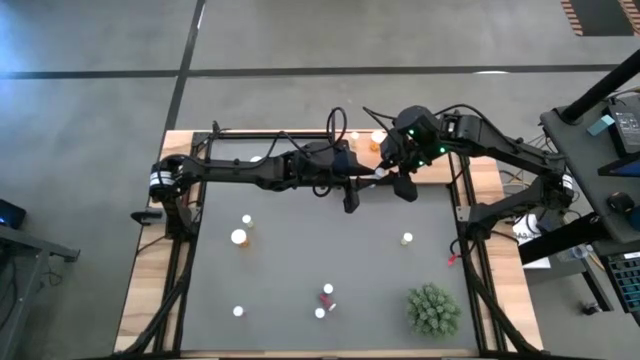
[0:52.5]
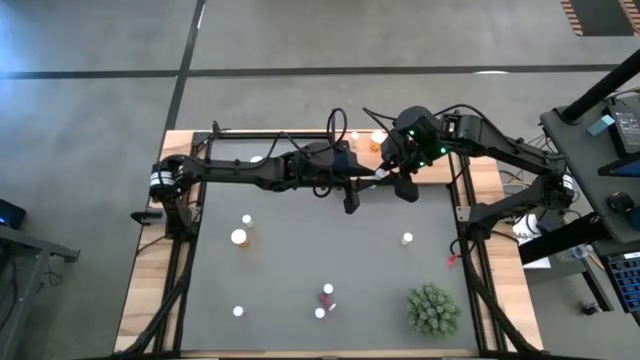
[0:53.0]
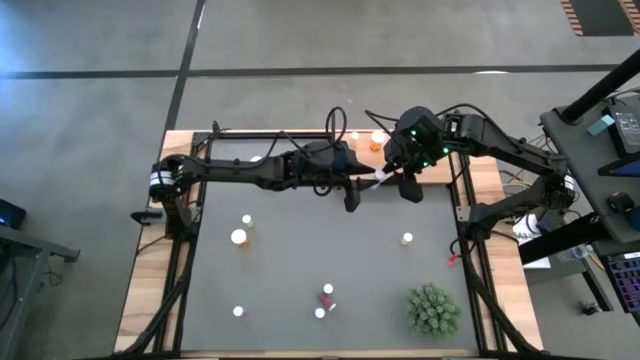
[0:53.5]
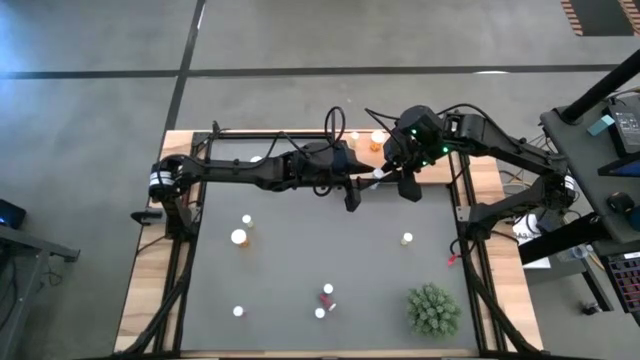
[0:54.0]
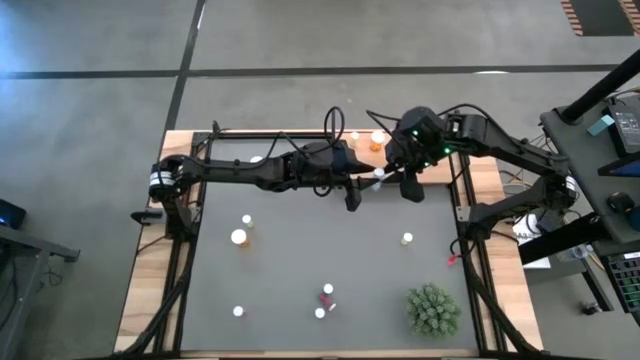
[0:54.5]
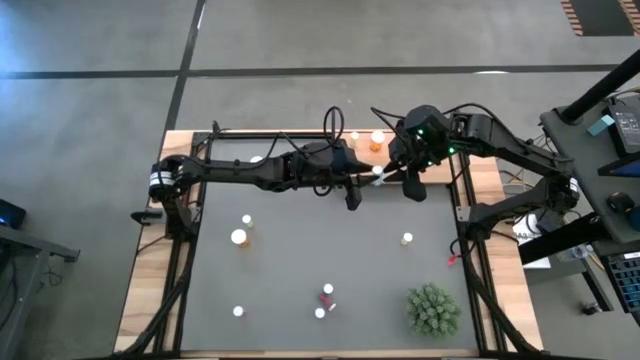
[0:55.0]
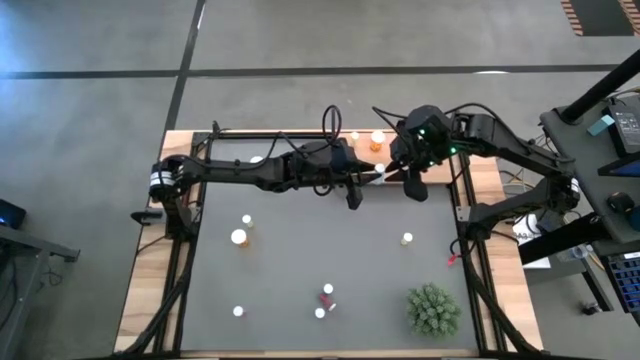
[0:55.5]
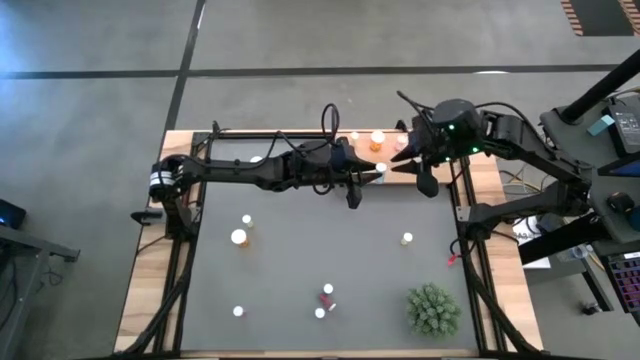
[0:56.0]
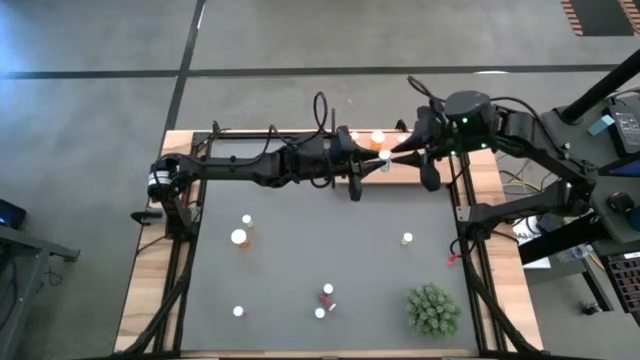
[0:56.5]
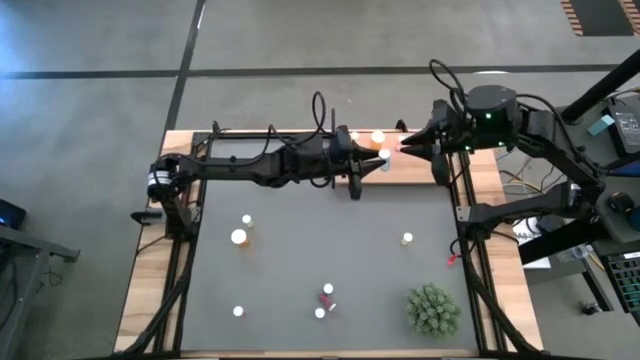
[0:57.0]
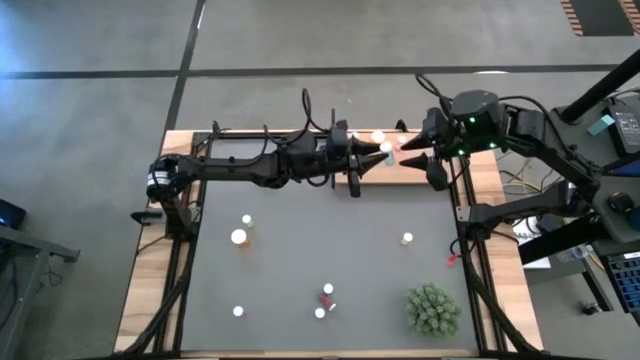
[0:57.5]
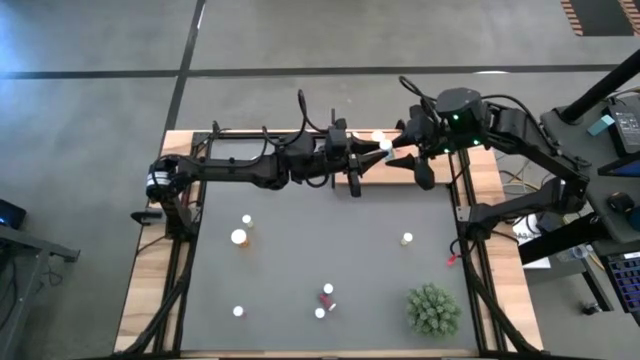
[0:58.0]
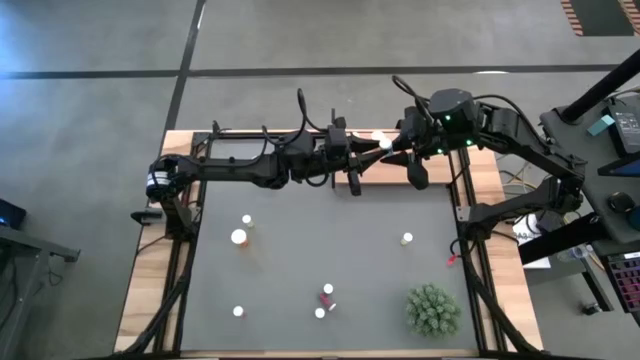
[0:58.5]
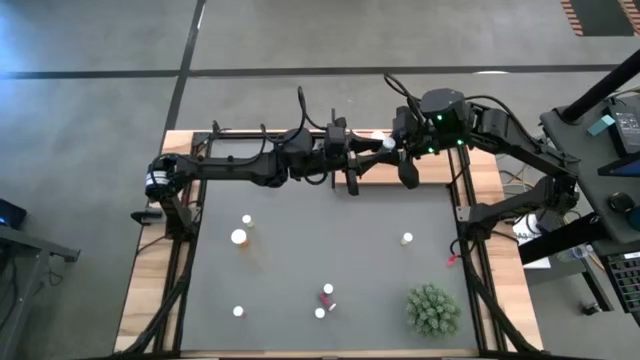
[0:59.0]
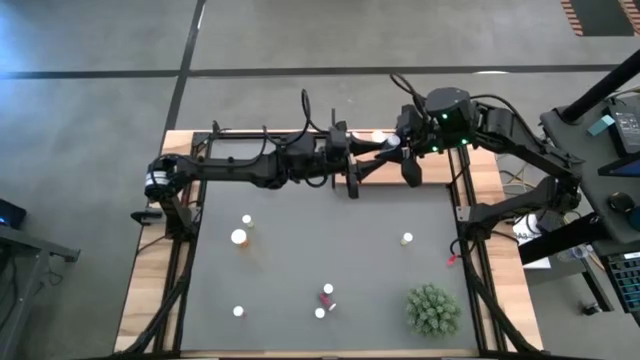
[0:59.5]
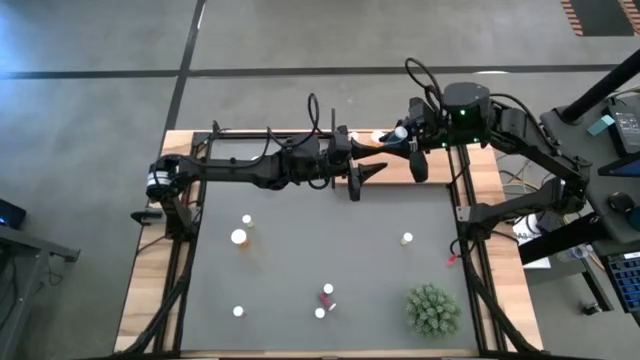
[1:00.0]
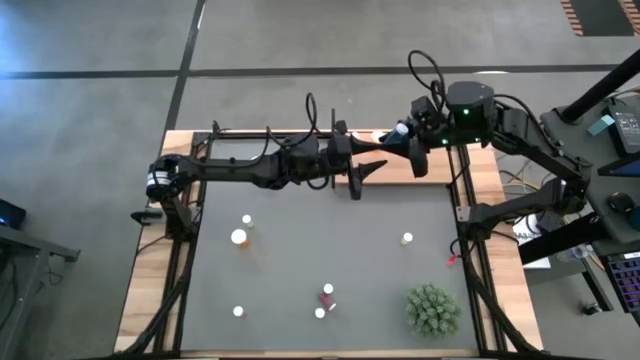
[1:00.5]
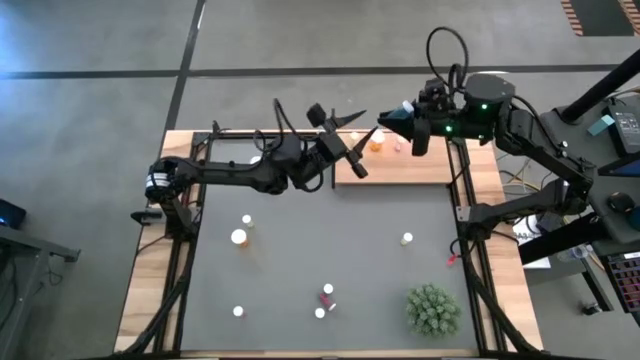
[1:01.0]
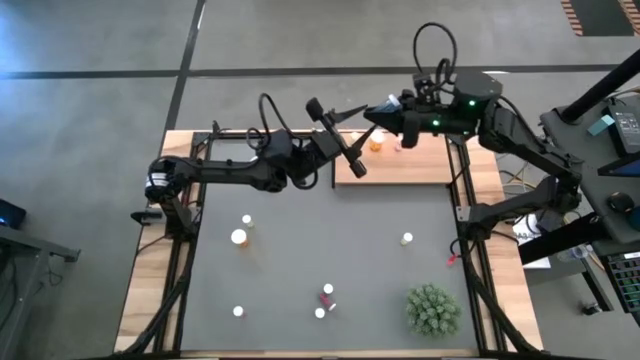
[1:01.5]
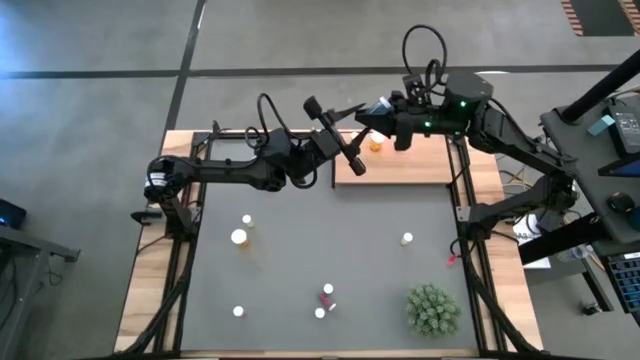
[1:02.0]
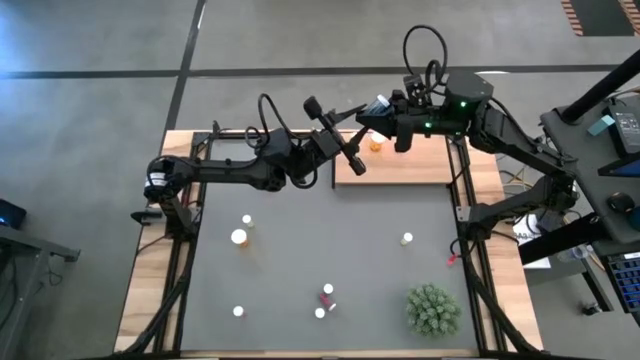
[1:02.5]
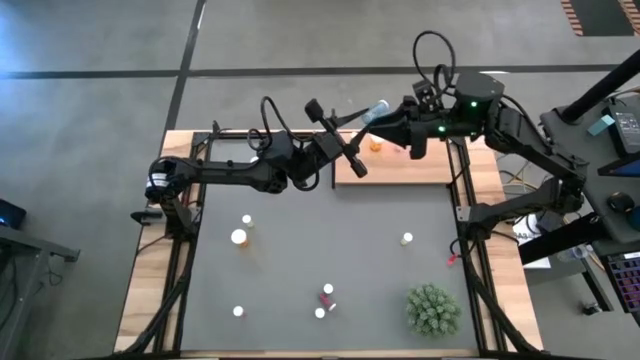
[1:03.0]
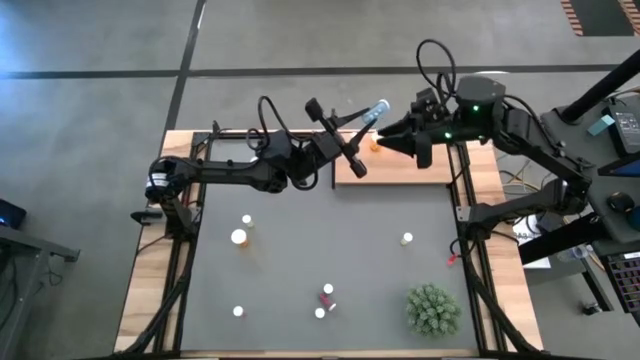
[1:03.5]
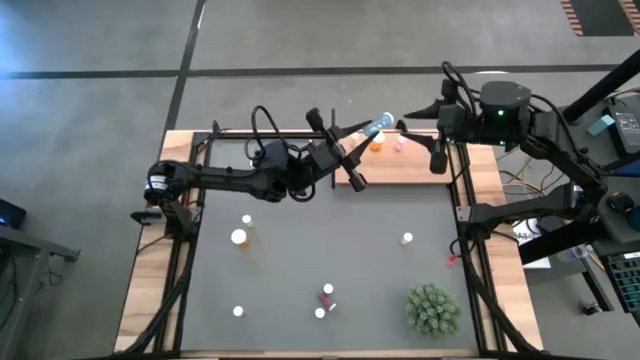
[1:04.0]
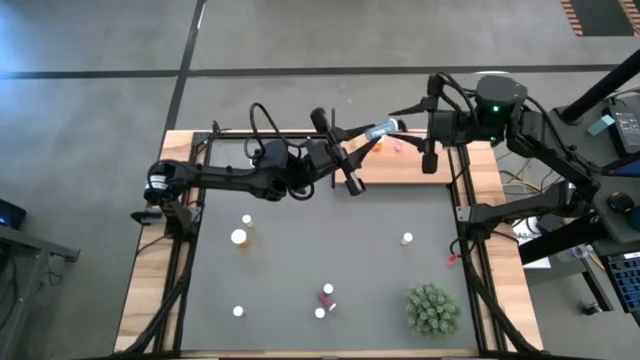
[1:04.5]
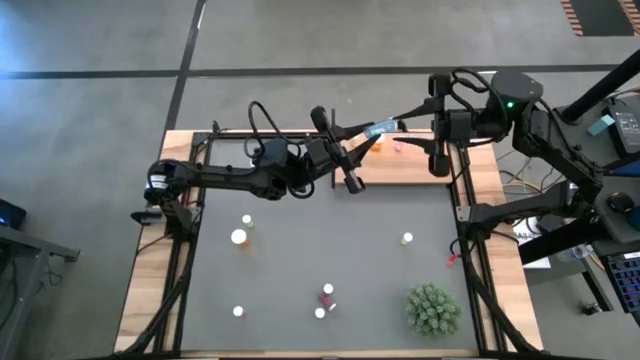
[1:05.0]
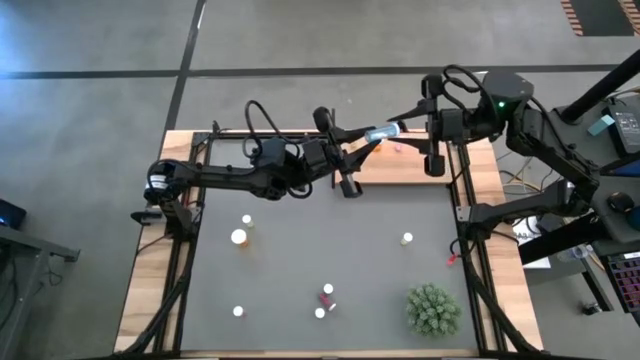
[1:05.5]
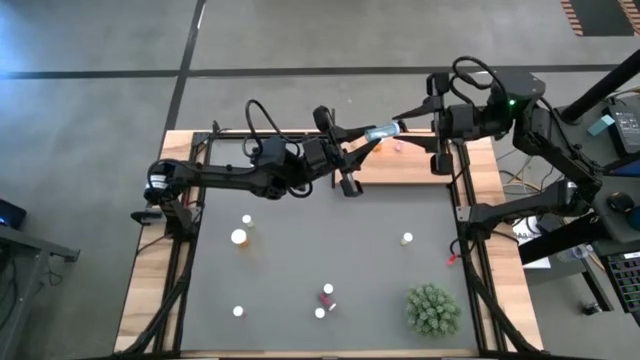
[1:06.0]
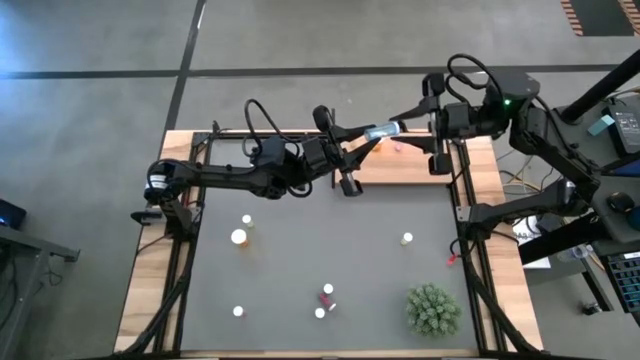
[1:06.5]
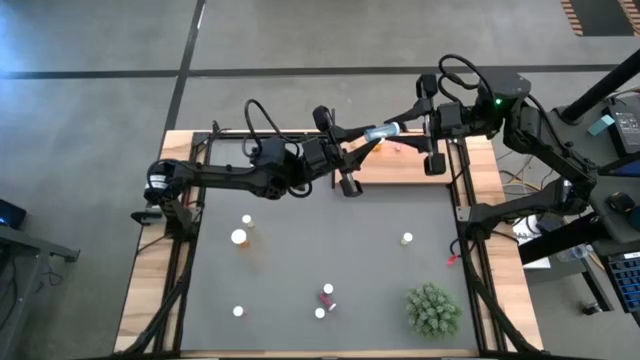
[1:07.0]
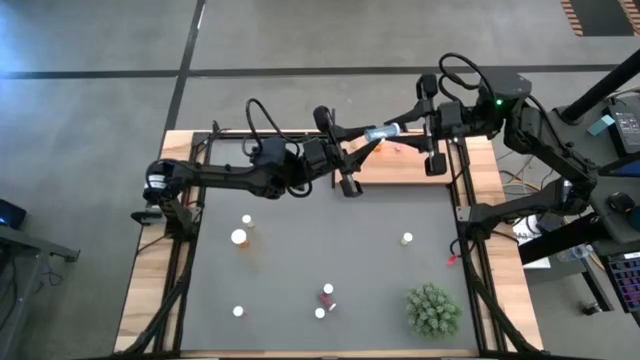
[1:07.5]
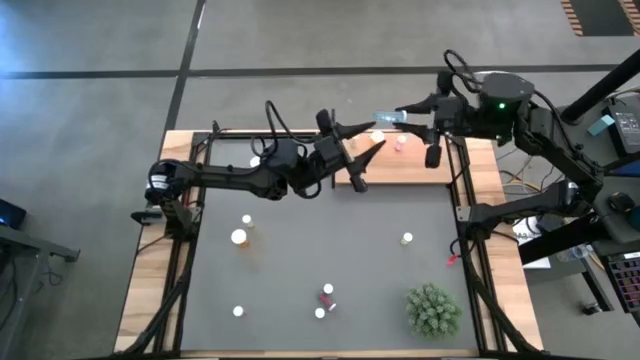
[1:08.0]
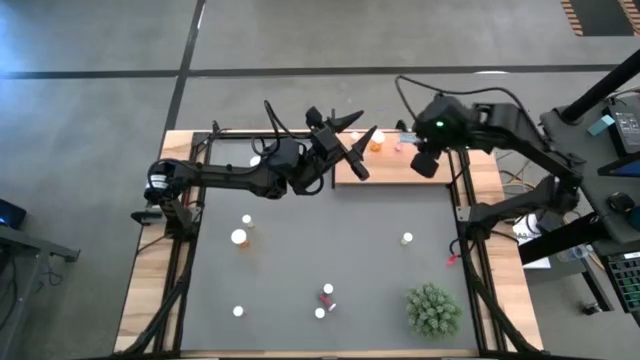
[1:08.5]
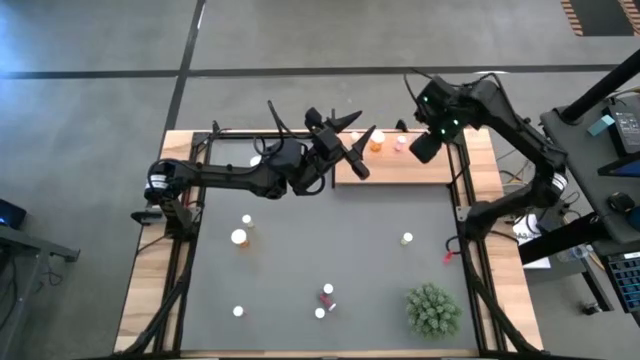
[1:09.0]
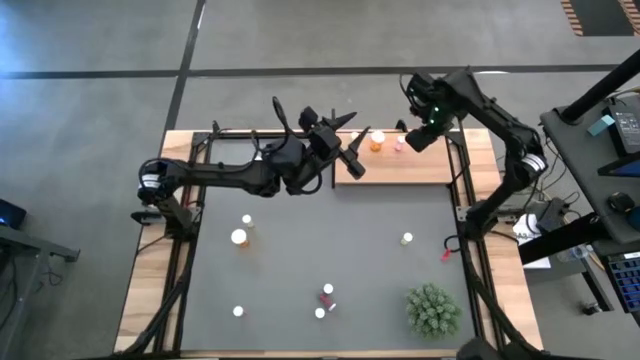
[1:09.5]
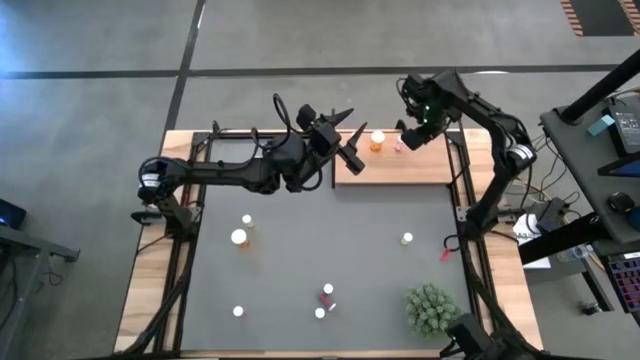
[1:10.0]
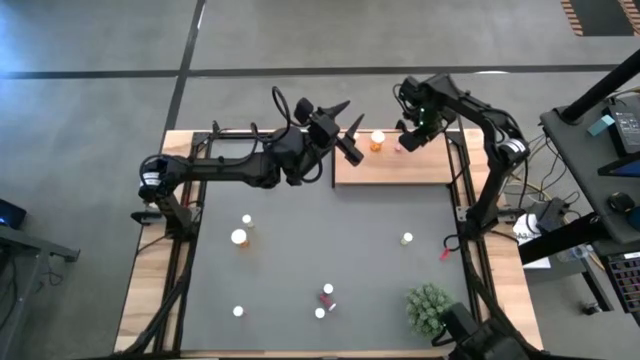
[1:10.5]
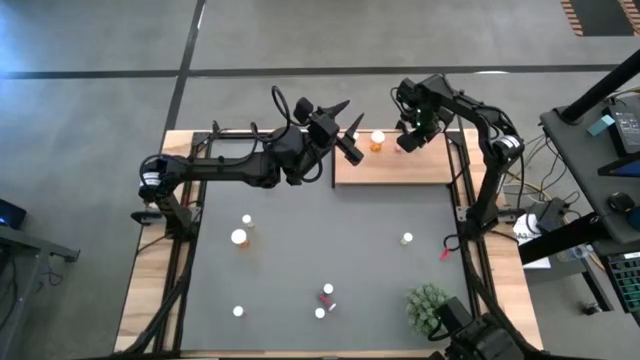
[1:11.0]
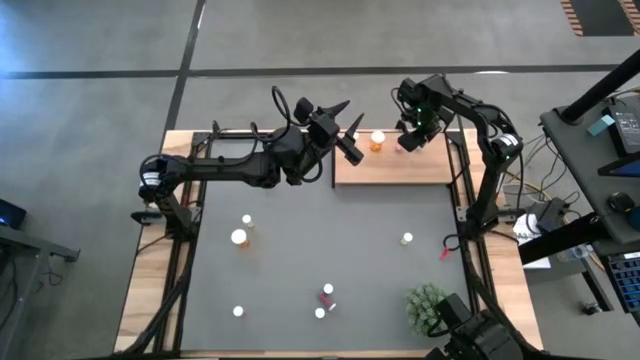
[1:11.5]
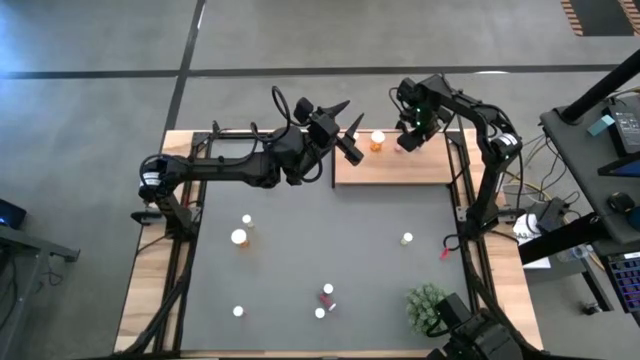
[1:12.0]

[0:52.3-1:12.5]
Task: Pick and place medicine bottles onto shelf by color
Put the bottom left blue medicine bottle on the shelf

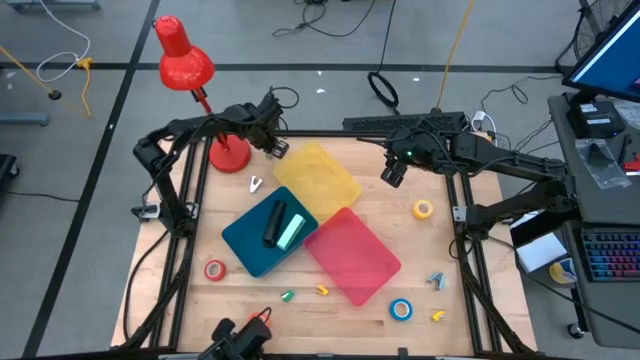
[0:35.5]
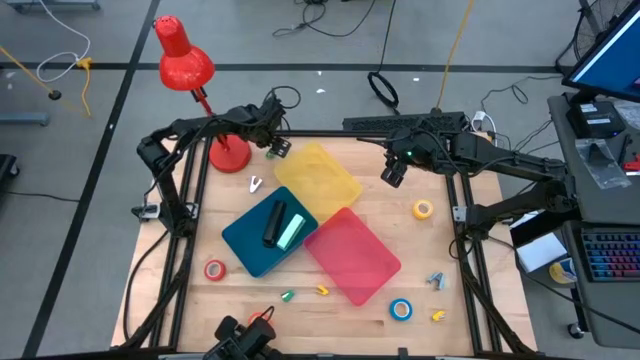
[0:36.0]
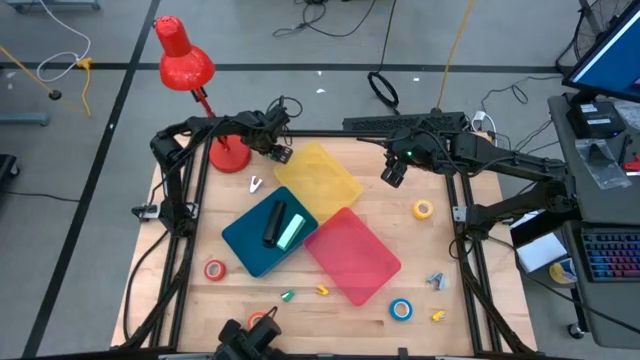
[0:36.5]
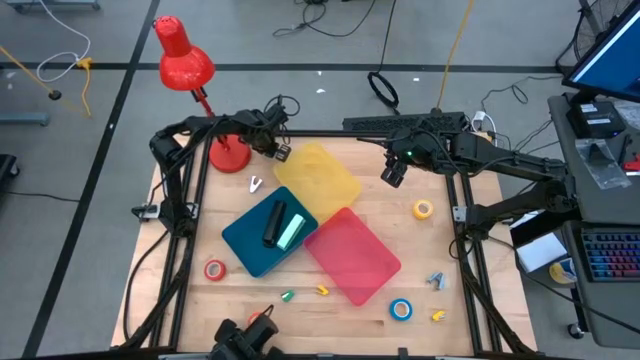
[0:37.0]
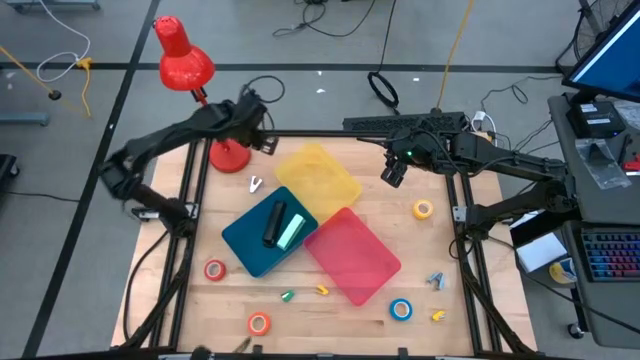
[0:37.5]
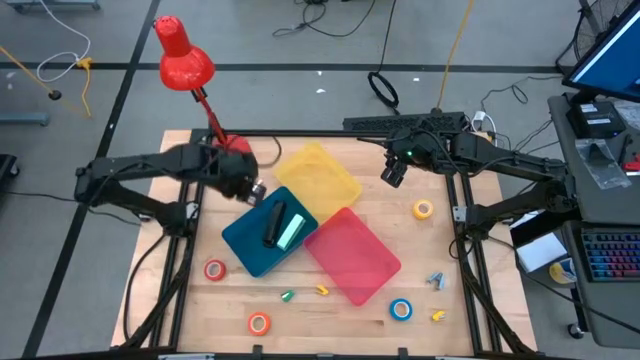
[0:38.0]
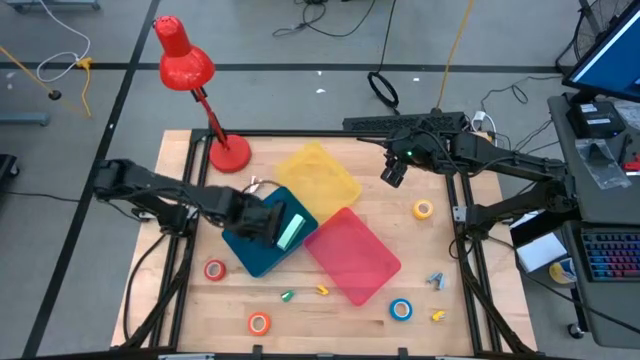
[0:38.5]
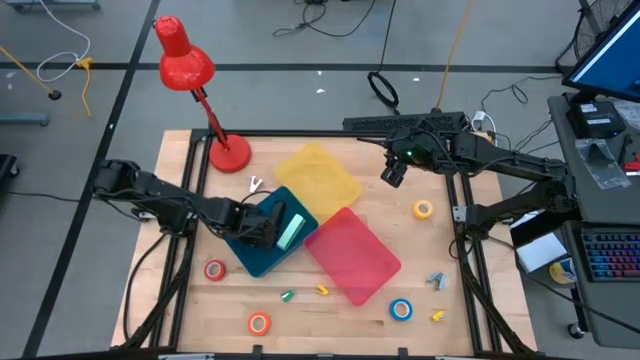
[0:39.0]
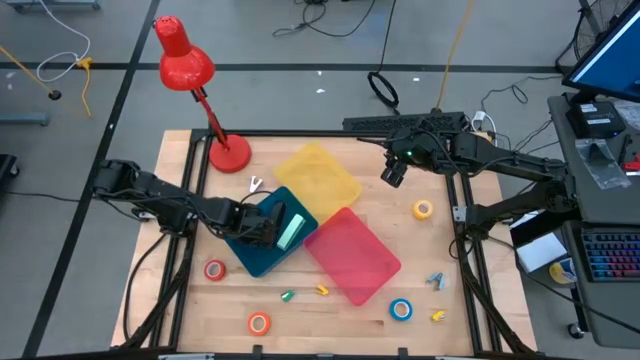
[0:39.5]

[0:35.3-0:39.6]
Task: Pick and place Stapler, Stapler remover, tape
Put the top green stapler into the blue bin
